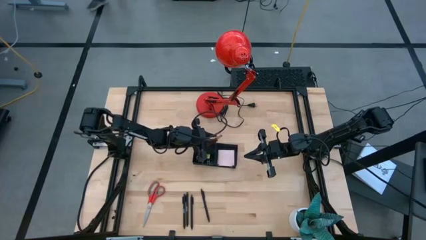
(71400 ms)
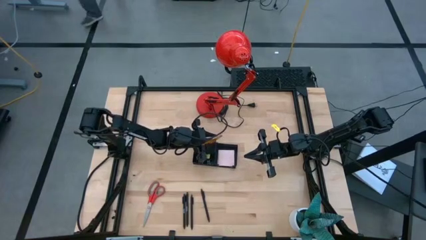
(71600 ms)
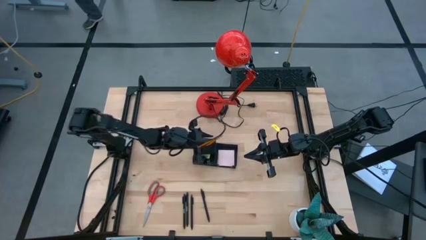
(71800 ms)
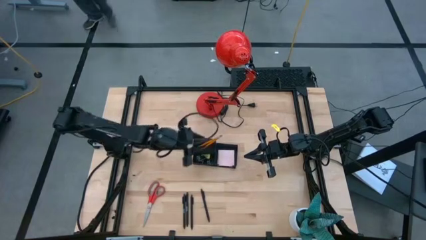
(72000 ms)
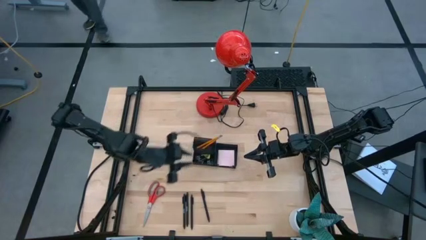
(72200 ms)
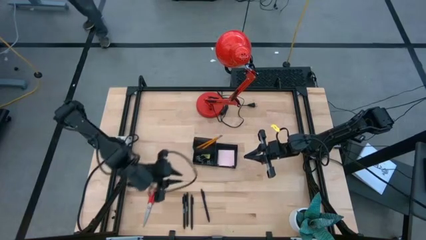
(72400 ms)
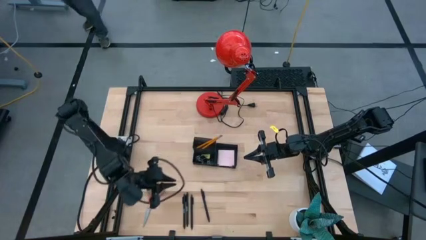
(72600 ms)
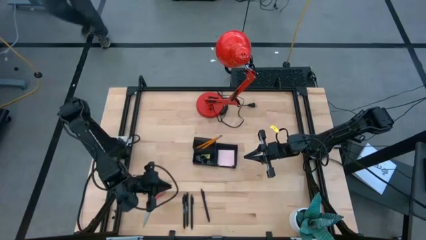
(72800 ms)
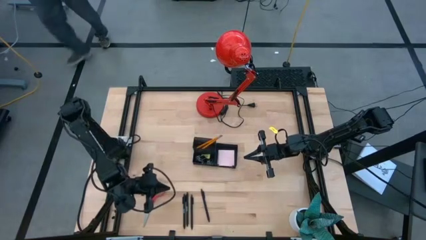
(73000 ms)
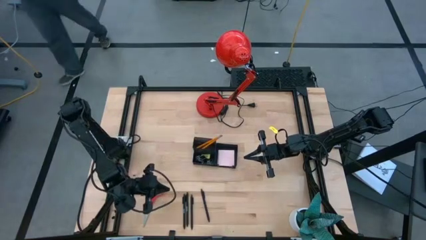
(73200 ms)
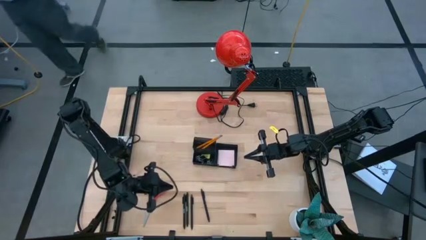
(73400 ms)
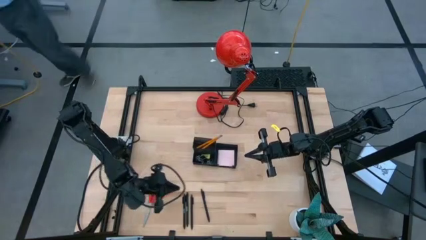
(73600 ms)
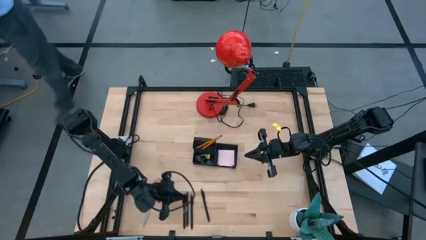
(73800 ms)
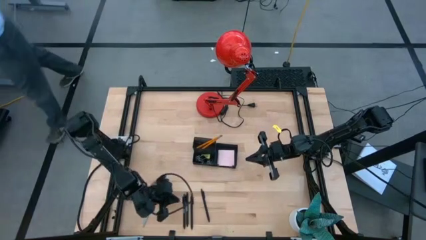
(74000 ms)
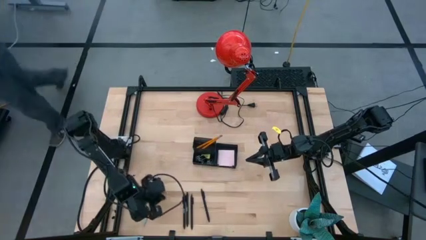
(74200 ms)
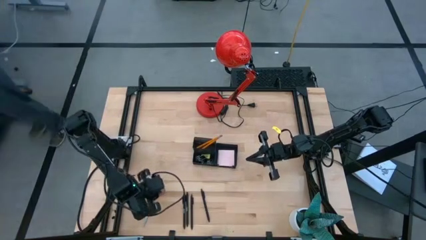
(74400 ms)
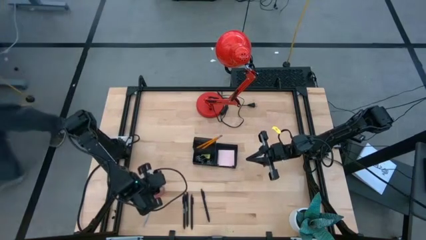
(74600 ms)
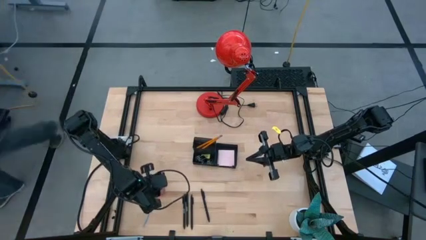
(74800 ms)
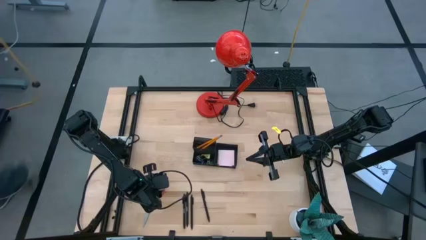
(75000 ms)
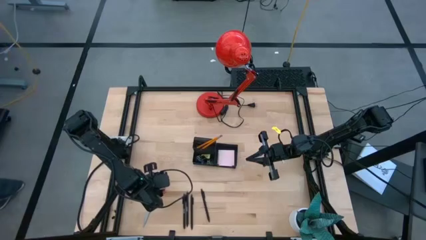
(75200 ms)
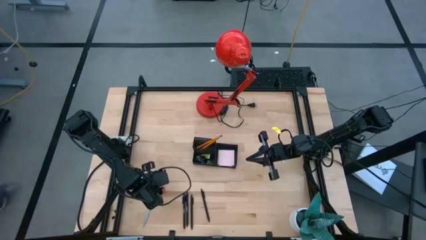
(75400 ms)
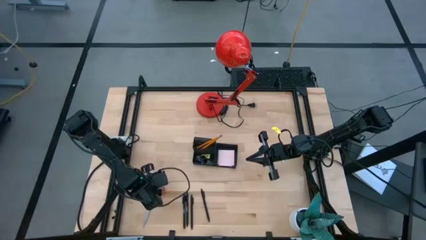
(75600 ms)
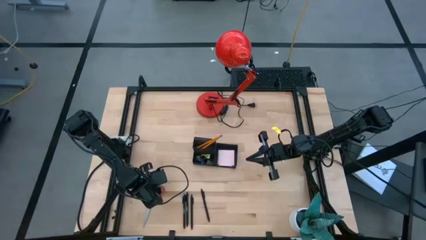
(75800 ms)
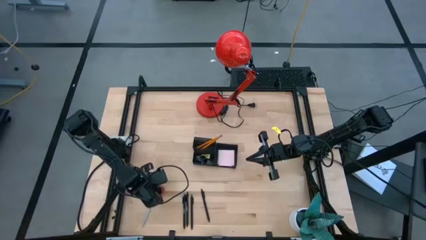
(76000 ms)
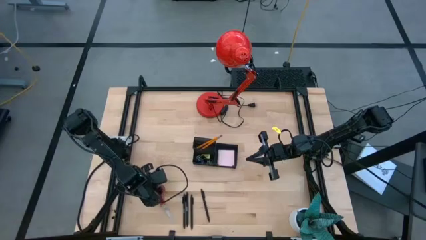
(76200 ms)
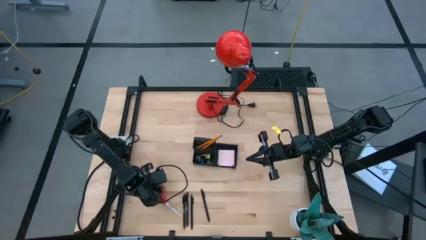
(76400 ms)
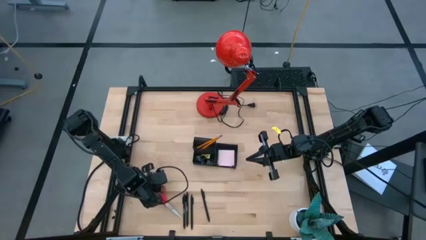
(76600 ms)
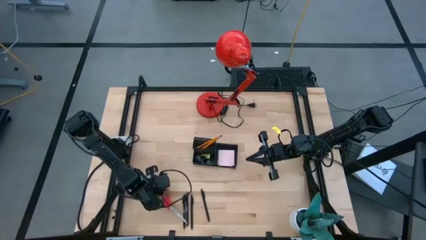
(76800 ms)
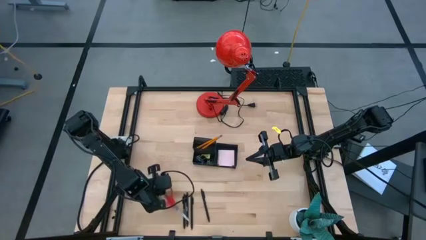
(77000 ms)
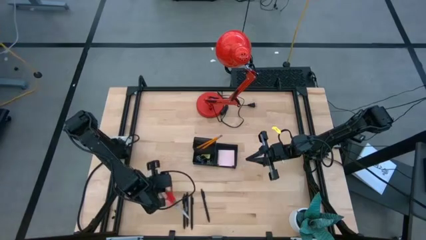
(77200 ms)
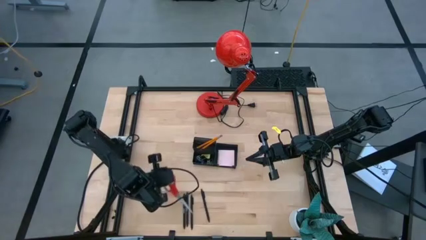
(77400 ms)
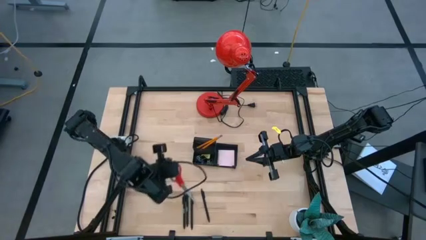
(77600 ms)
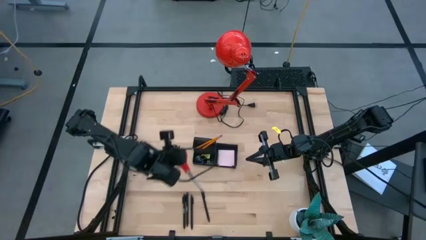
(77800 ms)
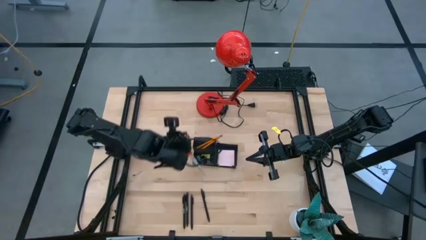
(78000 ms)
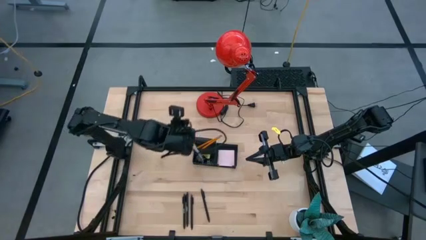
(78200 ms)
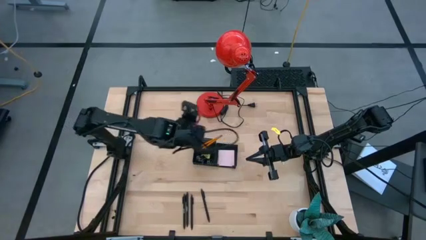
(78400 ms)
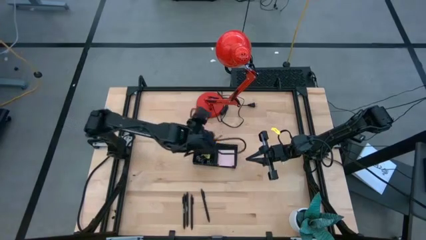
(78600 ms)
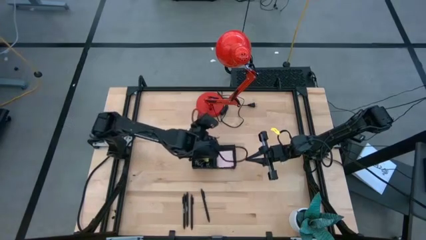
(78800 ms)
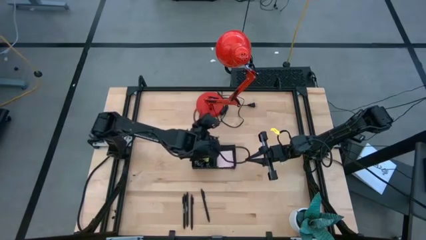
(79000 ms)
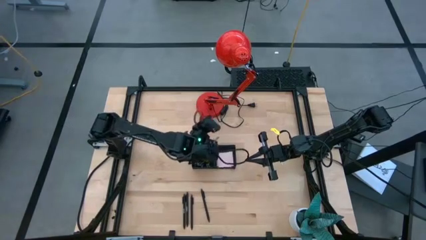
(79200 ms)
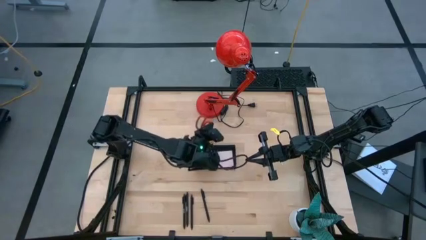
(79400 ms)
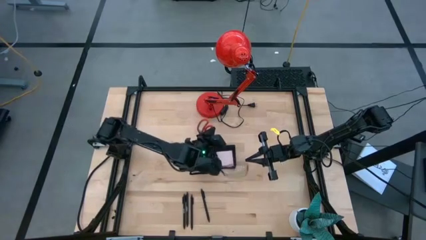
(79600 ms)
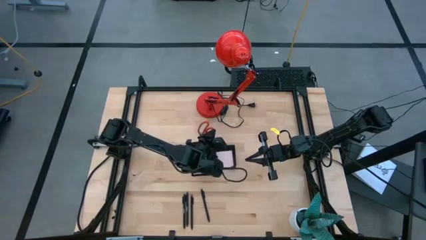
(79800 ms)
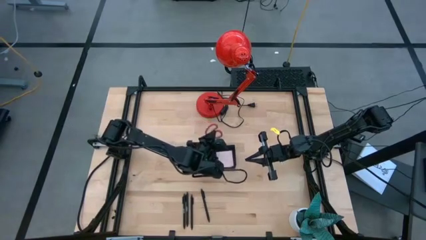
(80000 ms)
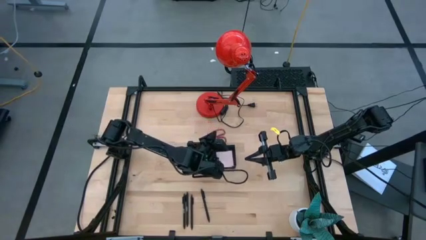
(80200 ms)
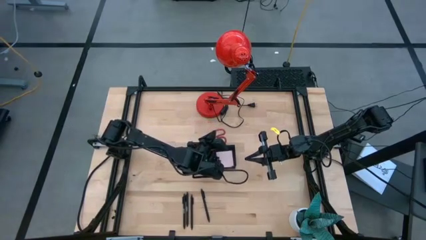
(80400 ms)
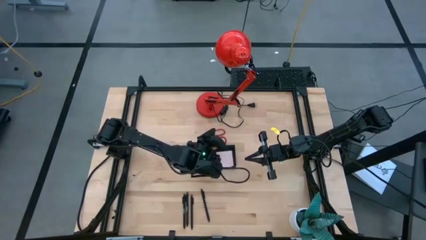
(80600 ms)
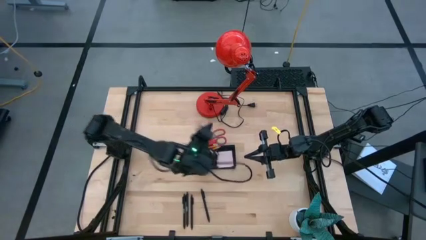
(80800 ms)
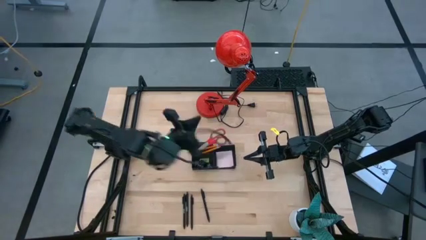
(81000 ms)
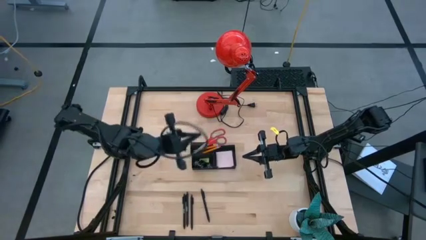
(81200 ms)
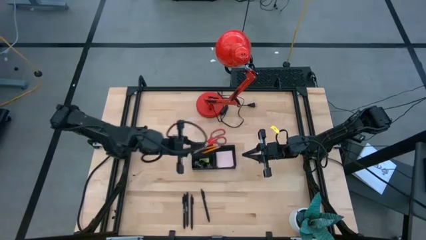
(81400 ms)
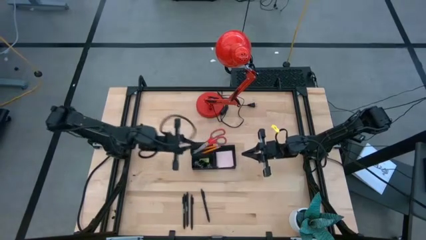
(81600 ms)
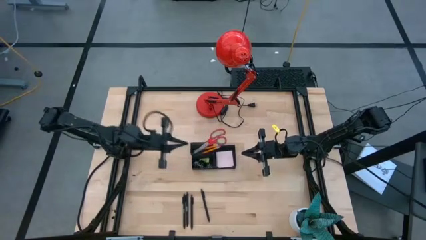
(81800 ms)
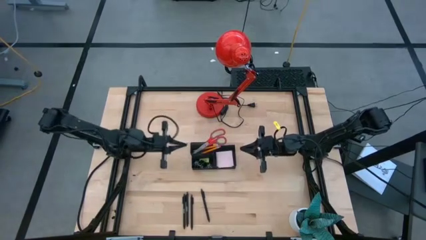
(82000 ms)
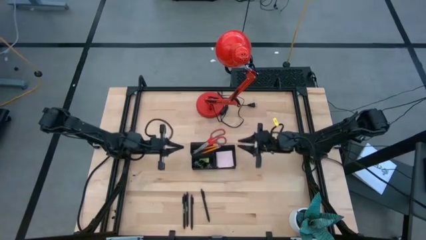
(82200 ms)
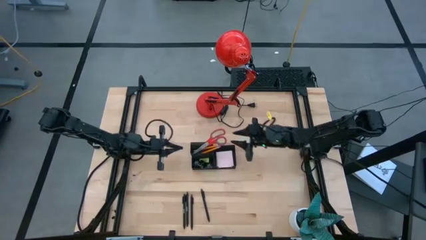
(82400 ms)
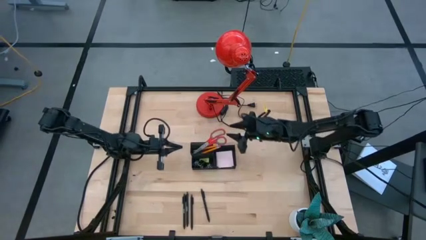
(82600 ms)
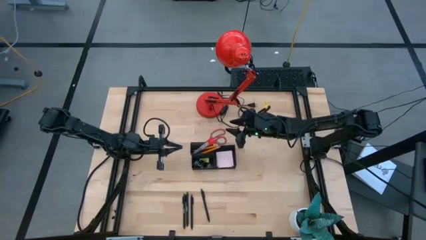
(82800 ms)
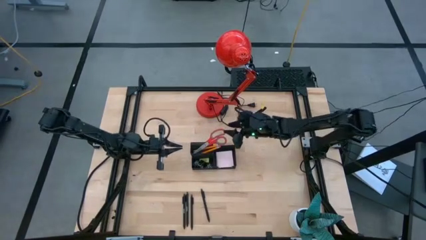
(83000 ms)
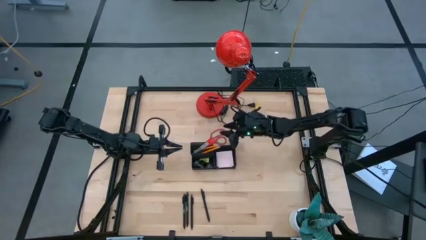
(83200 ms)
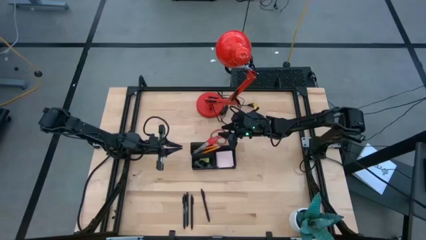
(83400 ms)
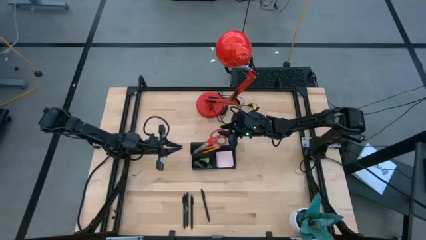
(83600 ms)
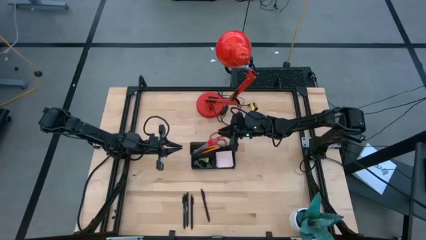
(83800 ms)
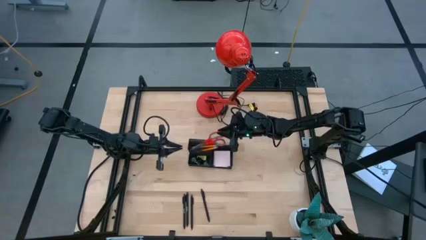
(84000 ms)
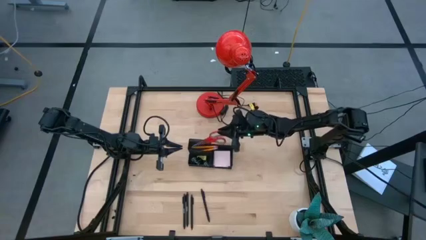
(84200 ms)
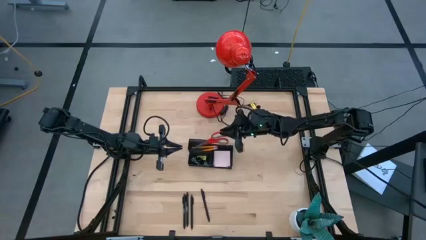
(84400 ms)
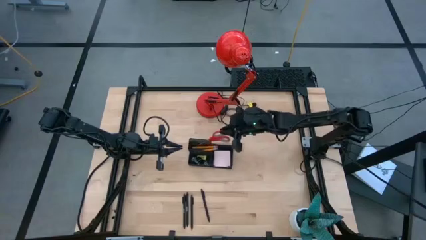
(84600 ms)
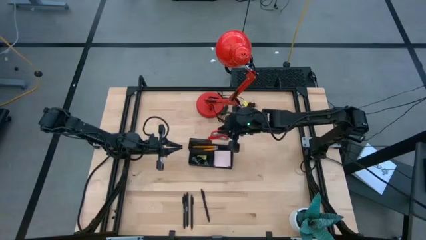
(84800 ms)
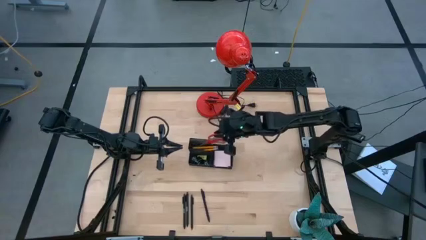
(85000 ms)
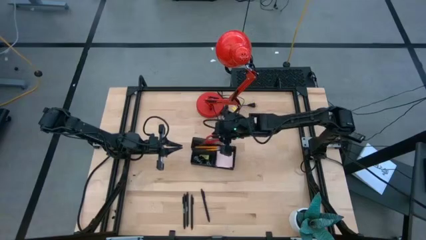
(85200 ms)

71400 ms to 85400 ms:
Task: Pick and place office supplies into organizer
Put the red scissors into the black mesh desk organizer

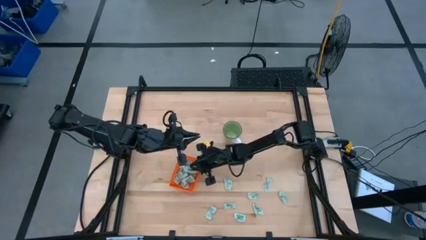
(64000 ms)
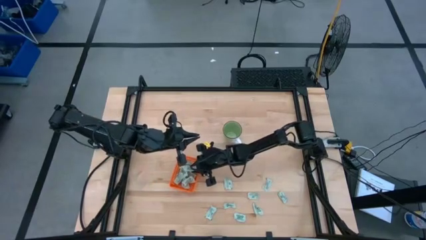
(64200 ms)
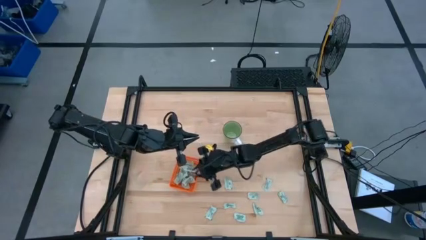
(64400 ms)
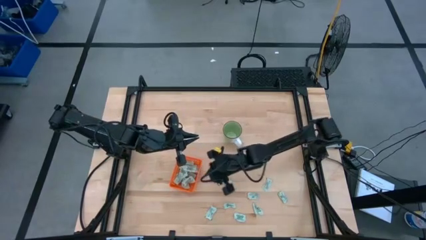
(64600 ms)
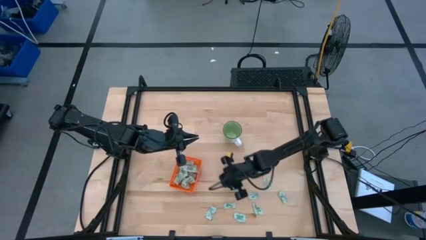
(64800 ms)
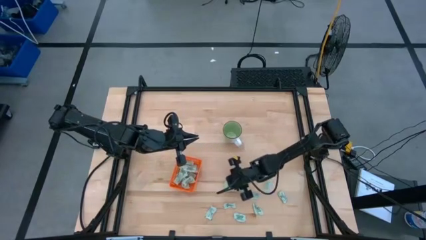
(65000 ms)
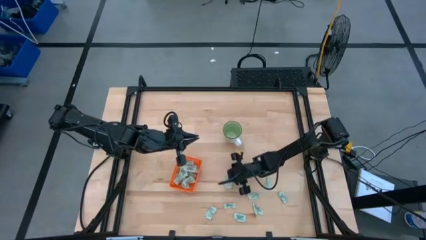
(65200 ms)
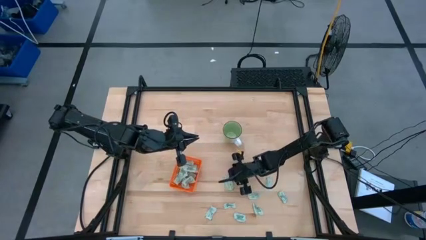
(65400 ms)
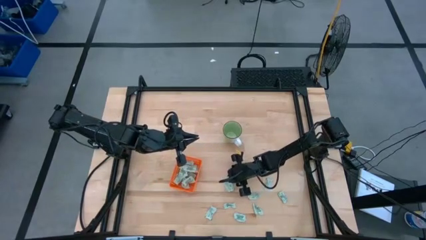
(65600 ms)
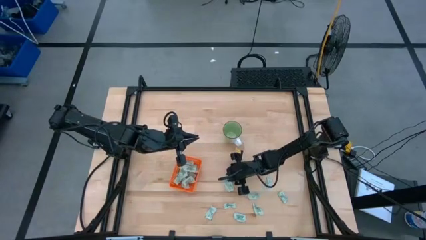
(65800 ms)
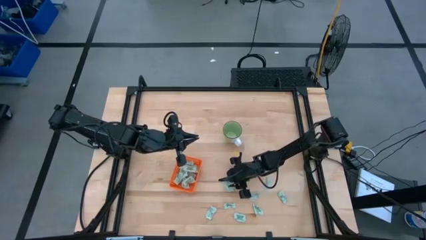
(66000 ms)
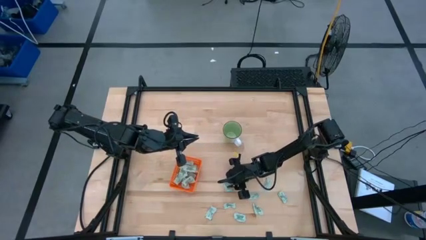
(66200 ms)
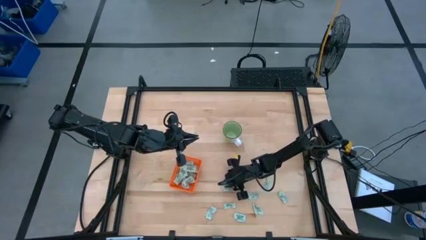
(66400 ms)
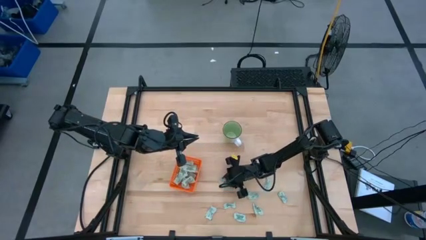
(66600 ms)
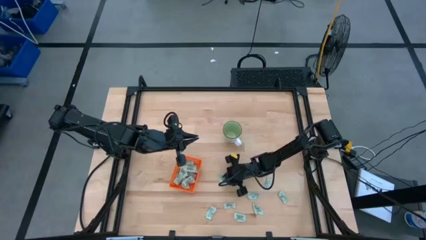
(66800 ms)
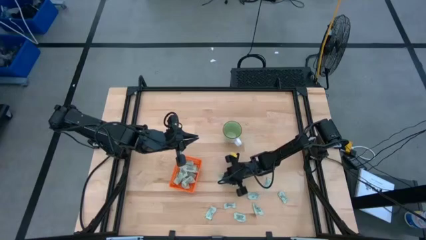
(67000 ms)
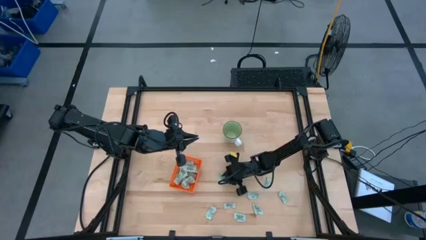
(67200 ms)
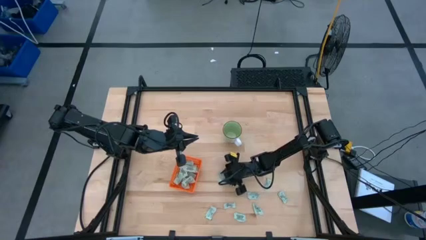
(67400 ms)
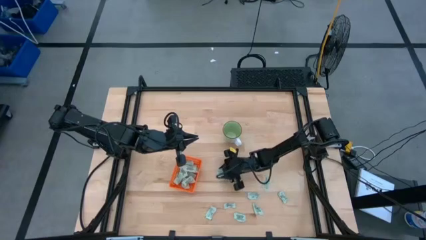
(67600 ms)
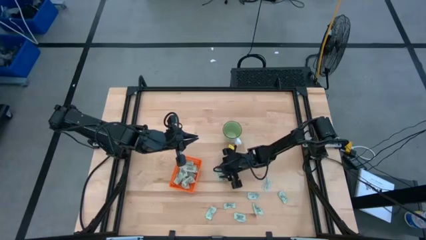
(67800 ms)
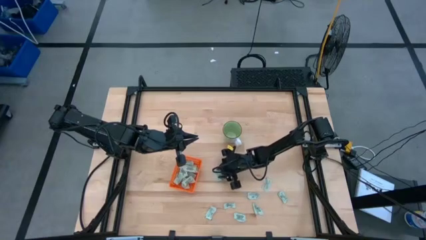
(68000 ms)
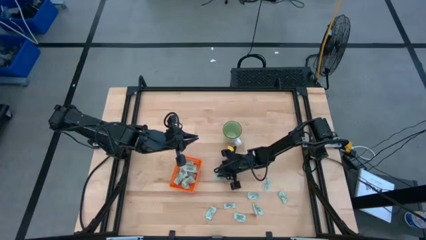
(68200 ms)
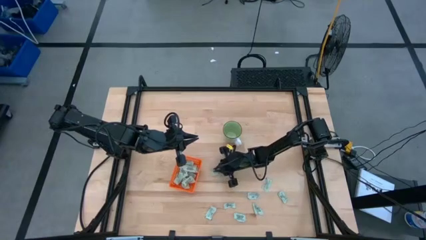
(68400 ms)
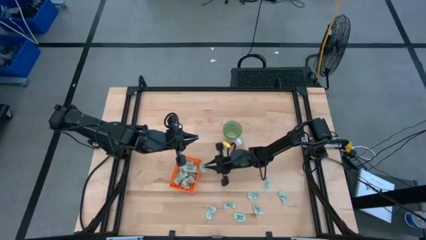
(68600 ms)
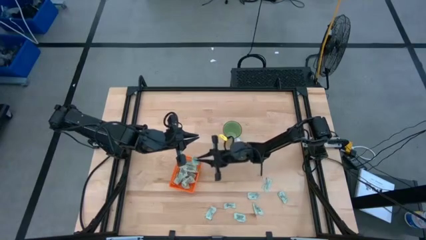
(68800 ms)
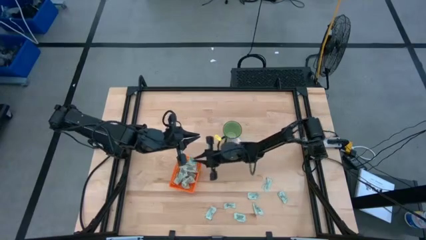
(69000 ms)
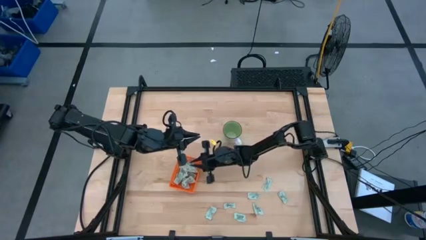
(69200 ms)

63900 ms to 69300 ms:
Task: Pick and place Stevia / Truvia into bins
Put the light green stevia packet into the orange basket
